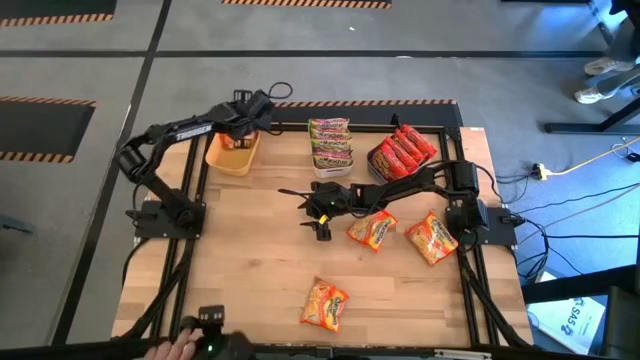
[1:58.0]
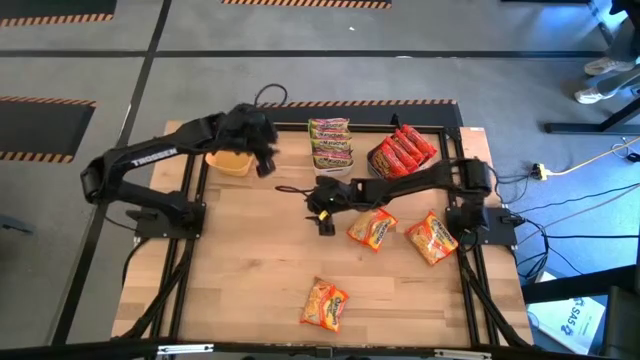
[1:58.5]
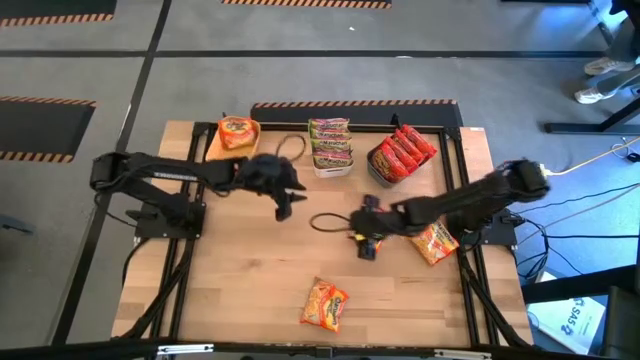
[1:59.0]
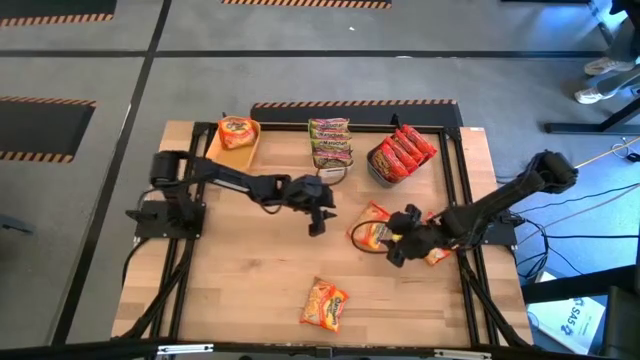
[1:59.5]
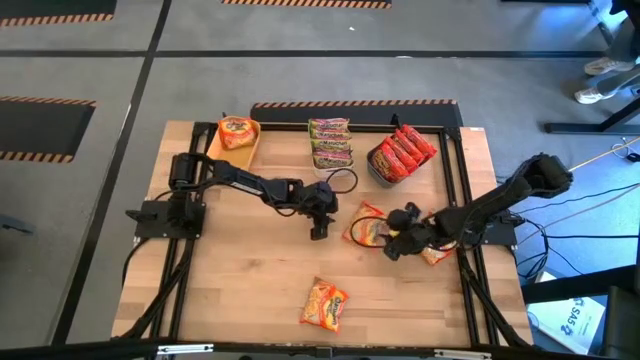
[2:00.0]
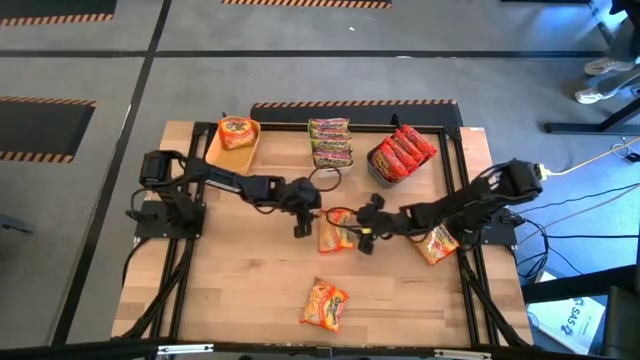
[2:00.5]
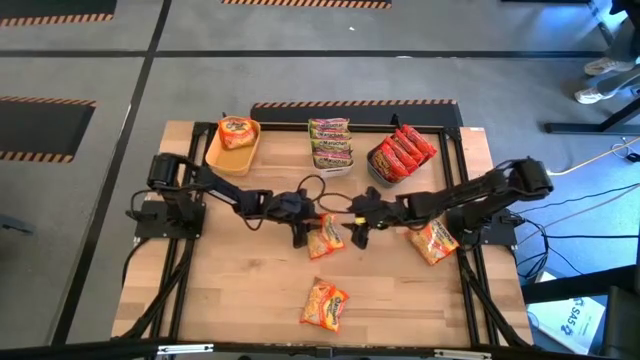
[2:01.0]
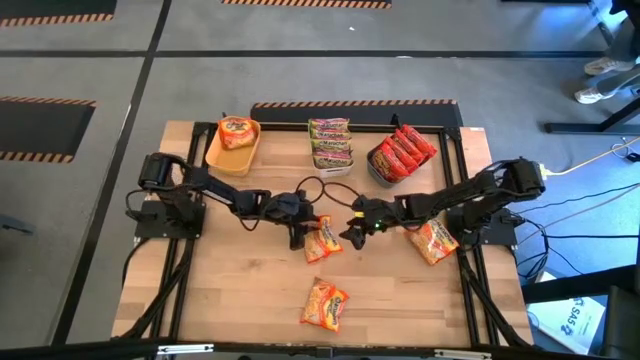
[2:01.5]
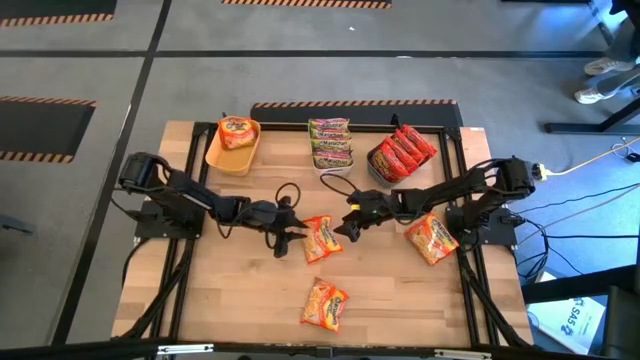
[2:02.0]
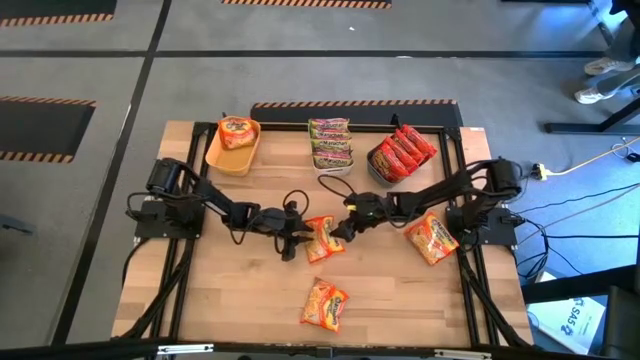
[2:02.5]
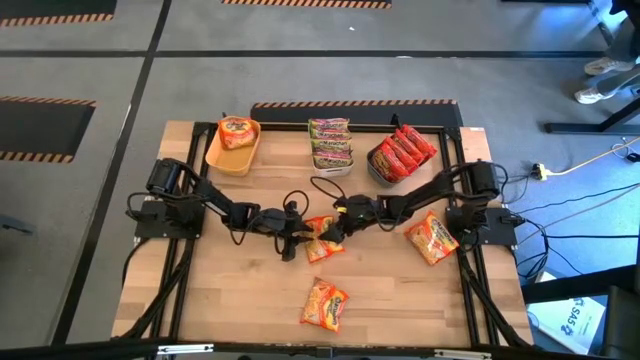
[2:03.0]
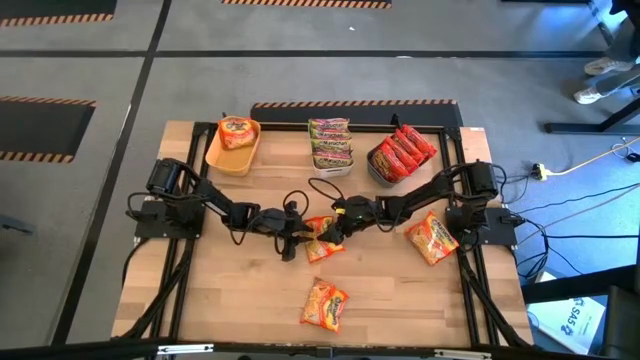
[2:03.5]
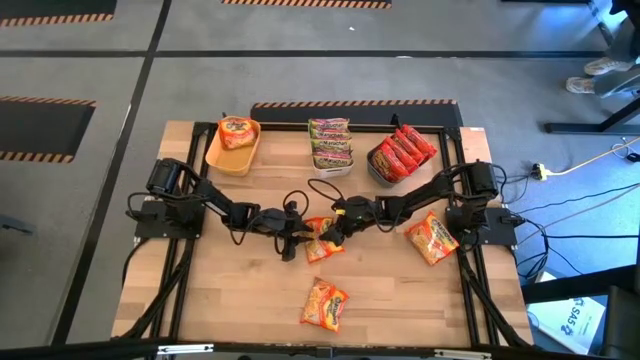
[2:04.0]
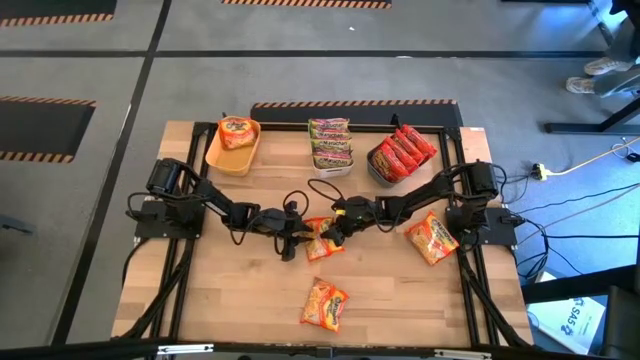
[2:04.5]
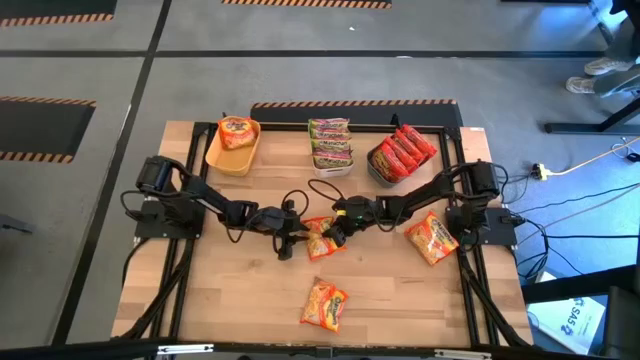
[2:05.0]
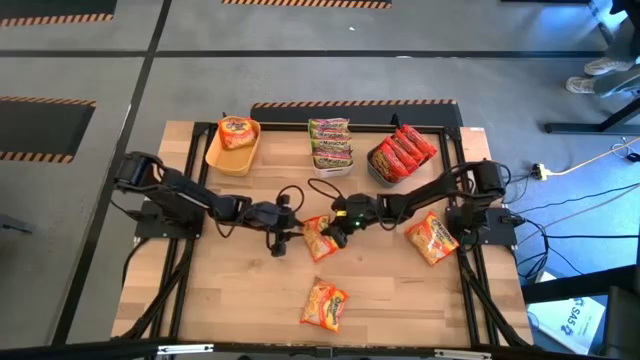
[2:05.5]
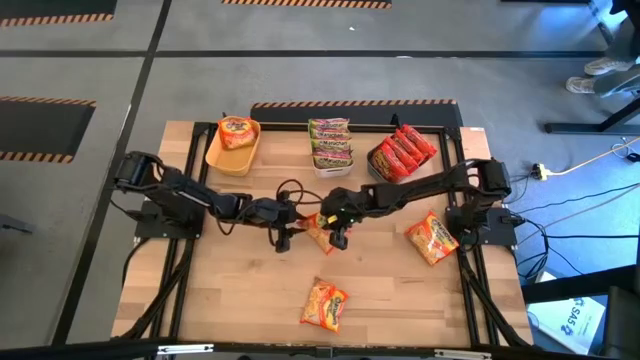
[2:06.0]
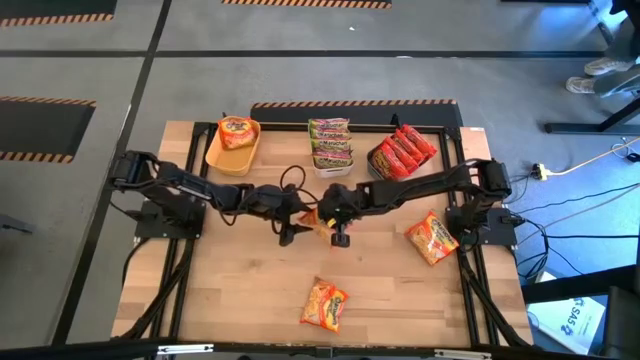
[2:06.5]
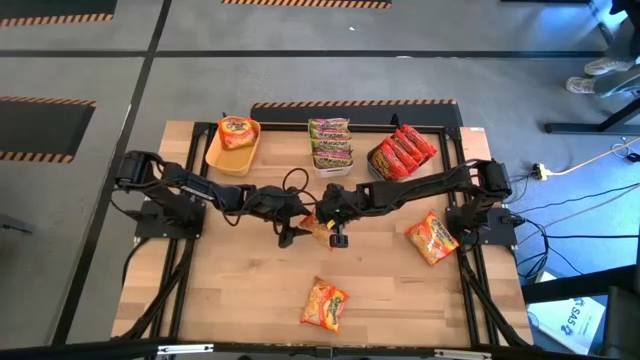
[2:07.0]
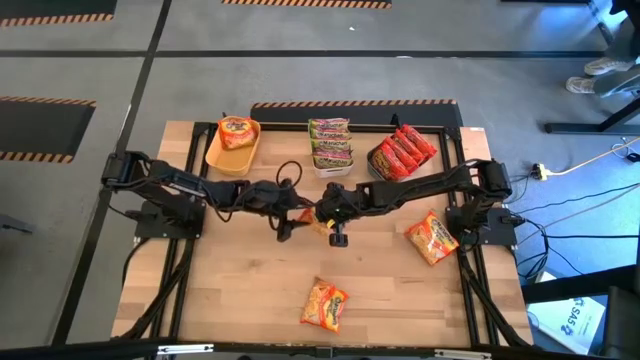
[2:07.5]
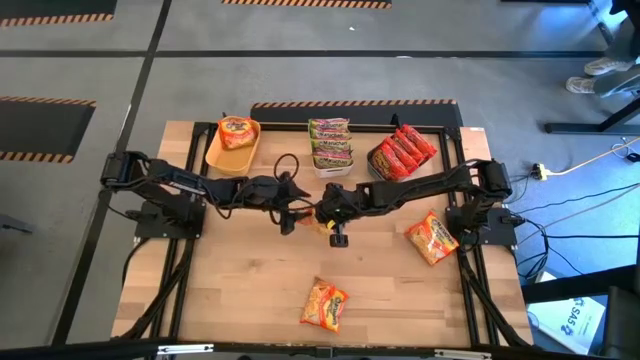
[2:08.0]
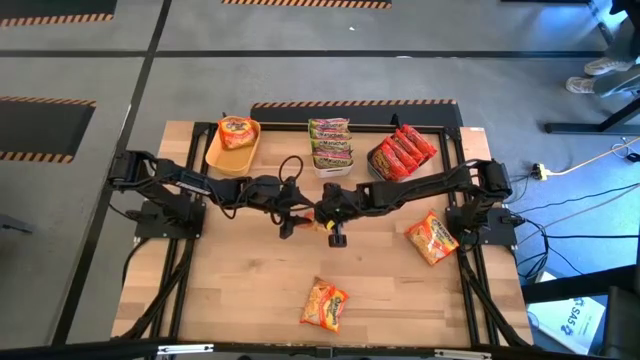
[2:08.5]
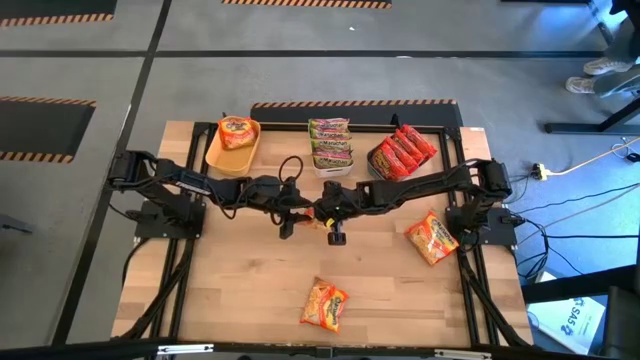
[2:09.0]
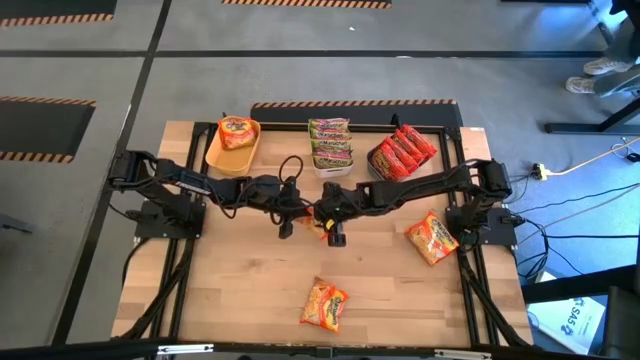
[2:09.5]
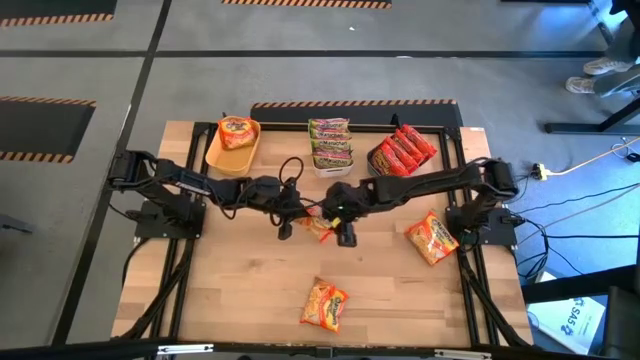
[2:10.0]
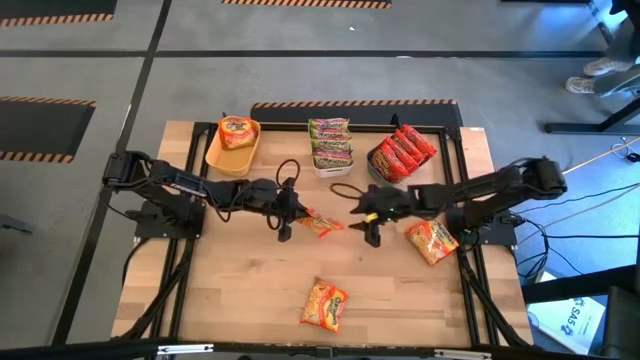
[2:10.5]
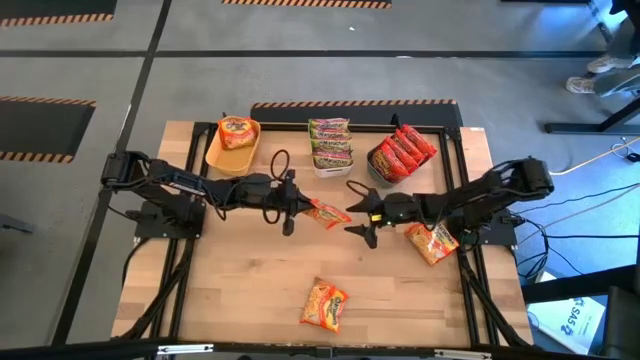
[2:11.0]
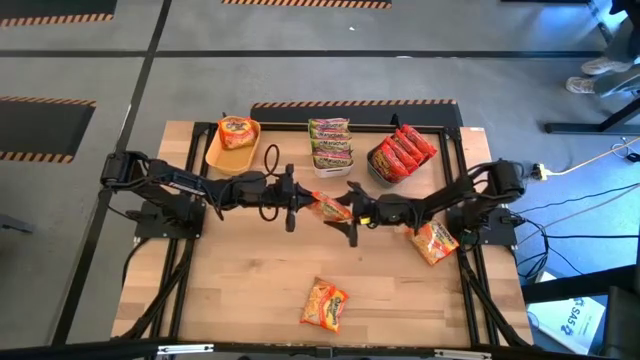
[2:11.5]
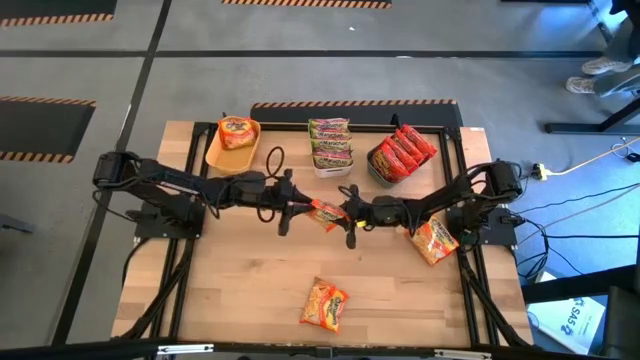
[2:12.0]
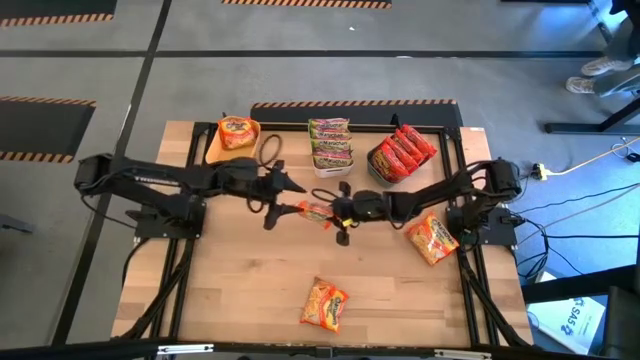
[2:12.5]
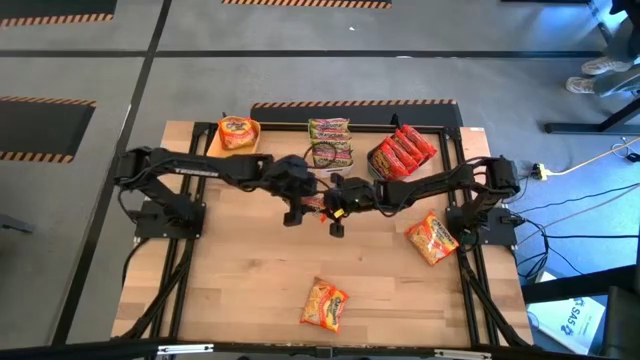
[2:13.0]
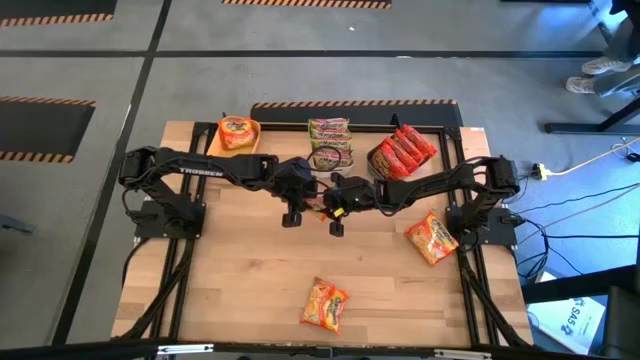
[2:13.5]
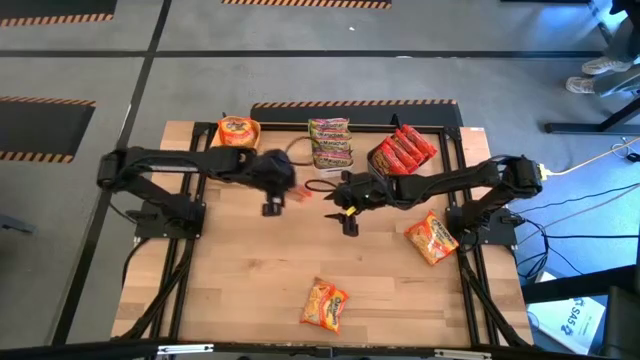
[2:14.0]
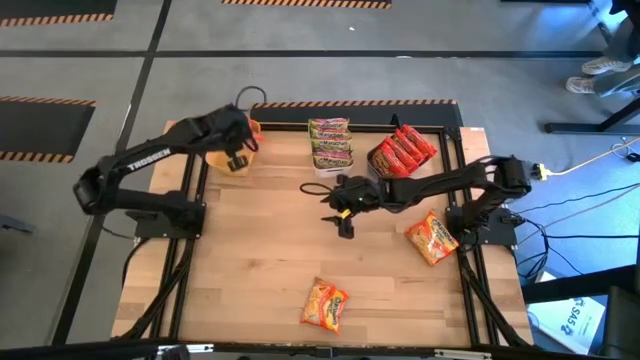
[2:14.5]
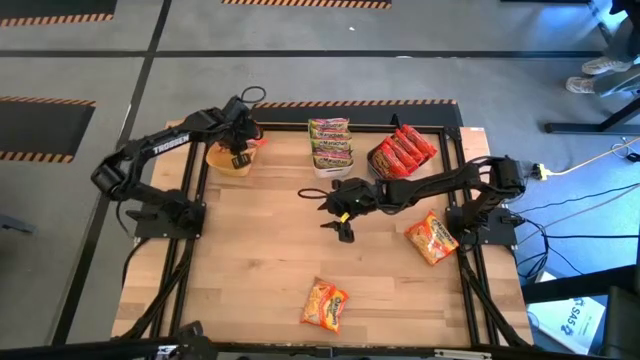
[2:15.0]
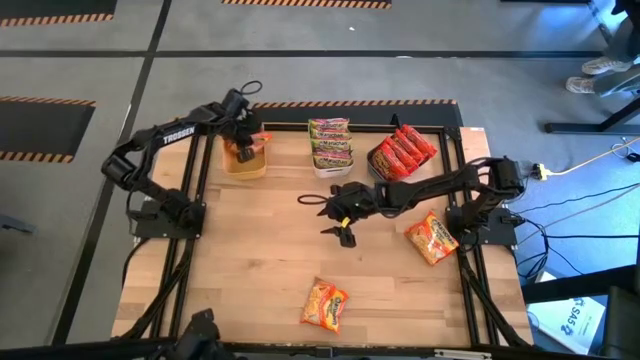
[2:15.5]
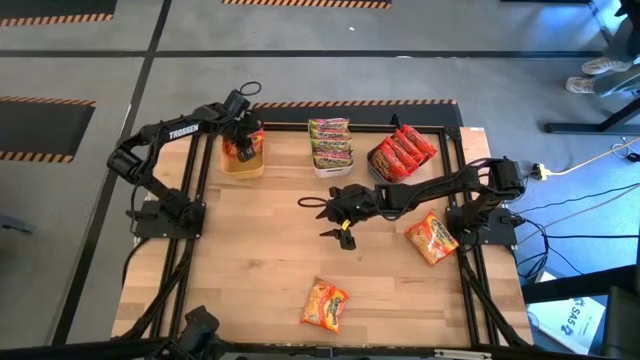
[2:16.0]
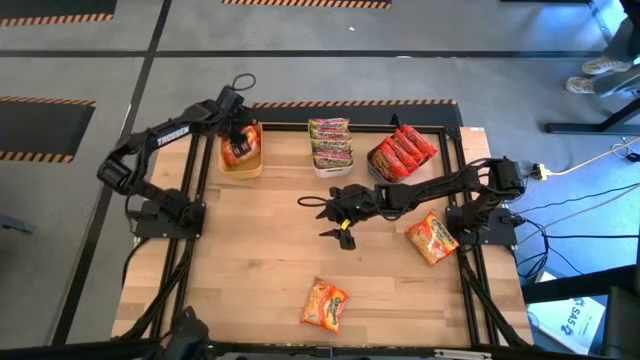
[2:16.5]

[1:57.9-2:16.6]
Task: Sort Maruchan noodles
Put the orange noodle pack into the yellow bin

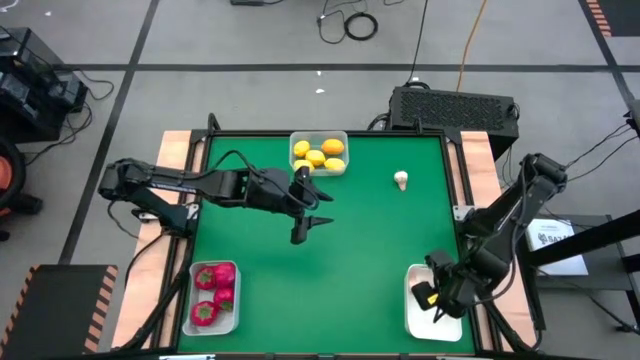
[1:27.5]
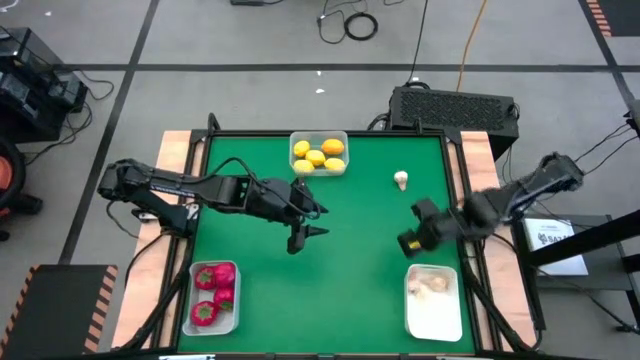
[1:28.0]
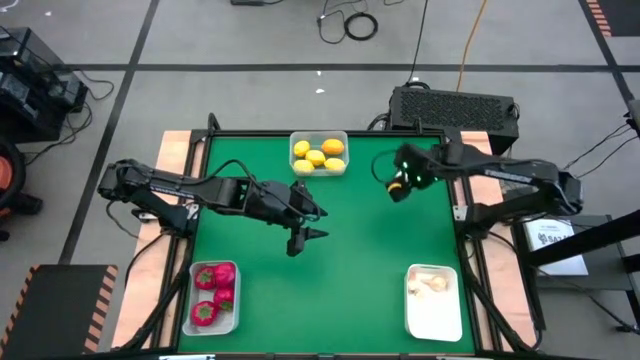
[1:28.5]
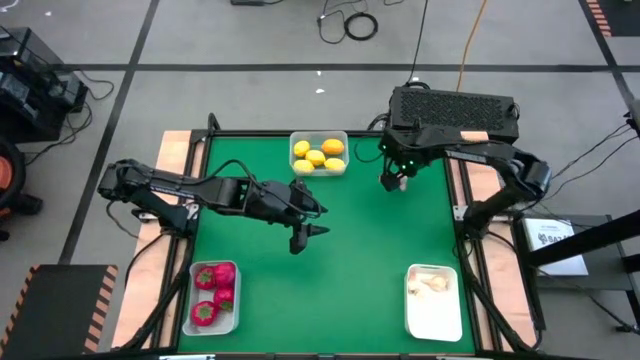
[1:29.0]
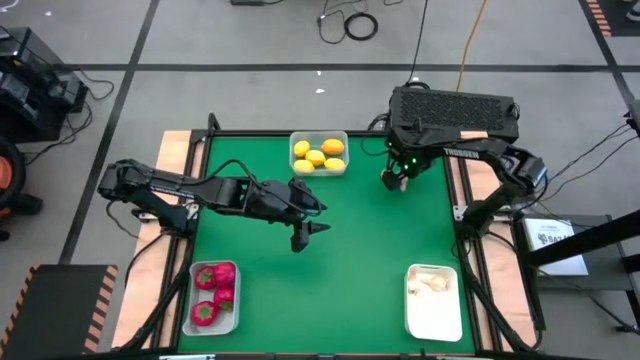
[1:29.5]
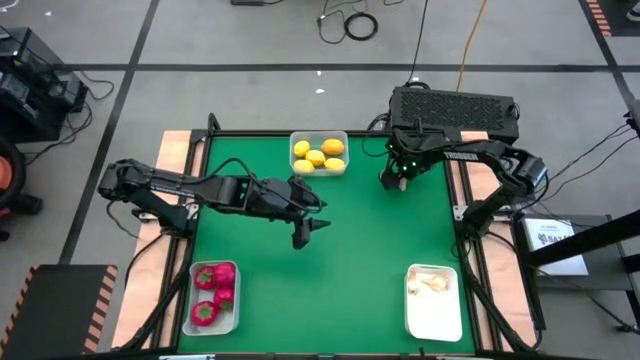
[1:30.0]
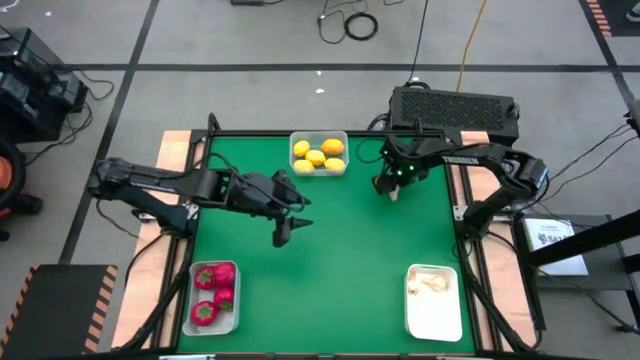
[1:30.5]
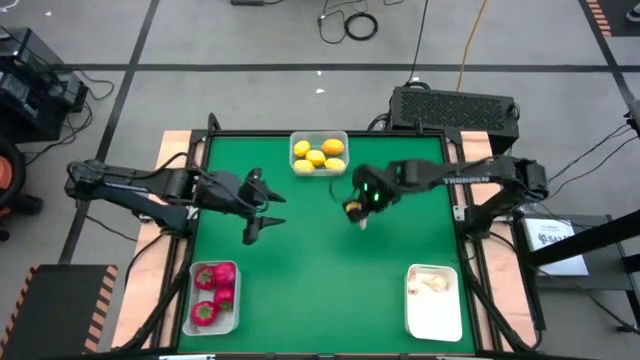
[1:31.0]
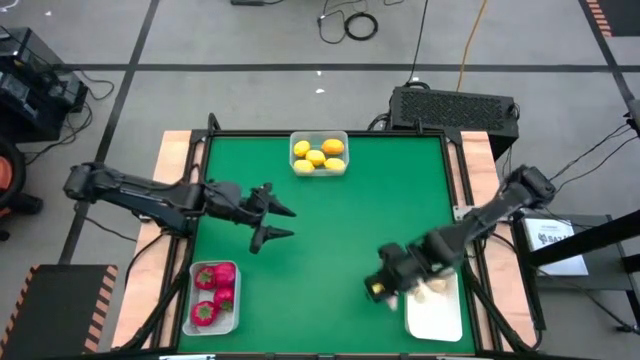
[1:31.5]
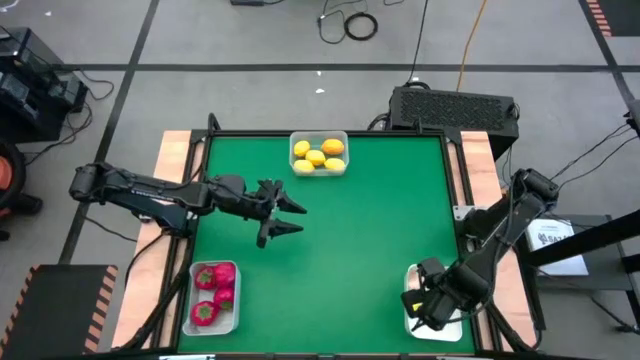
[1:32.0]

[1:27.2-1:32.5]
Task: Sort produce into baskets
Put the garlic into the white bin
